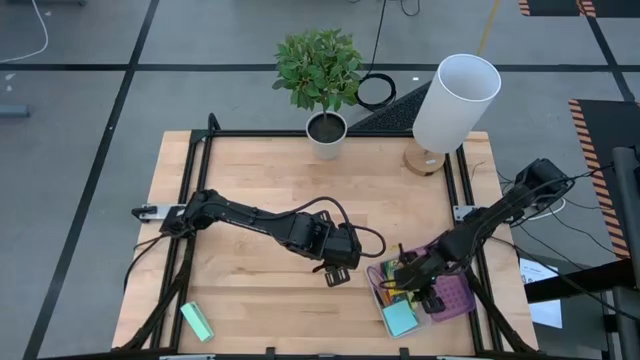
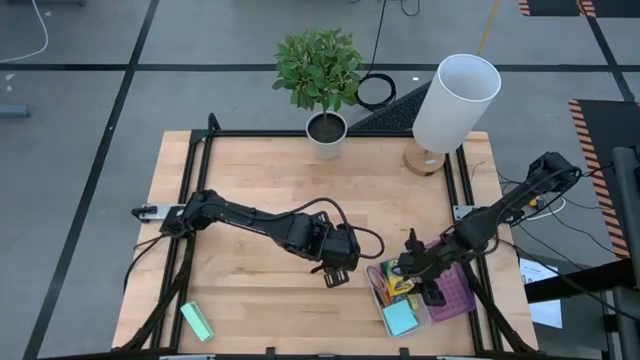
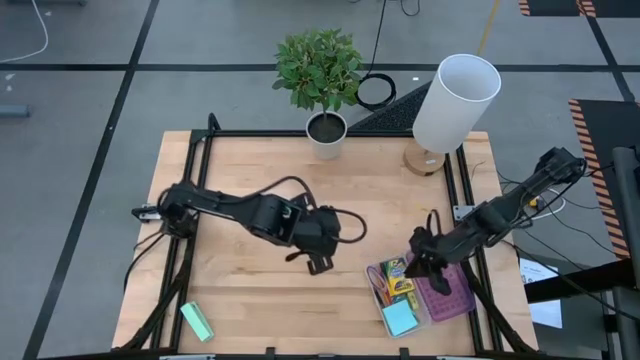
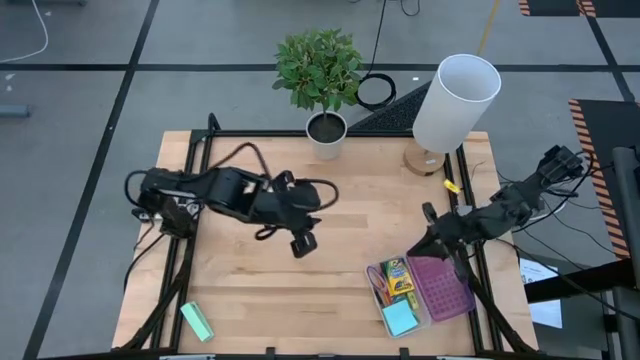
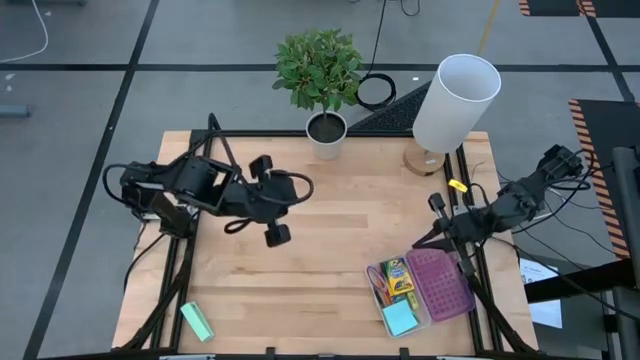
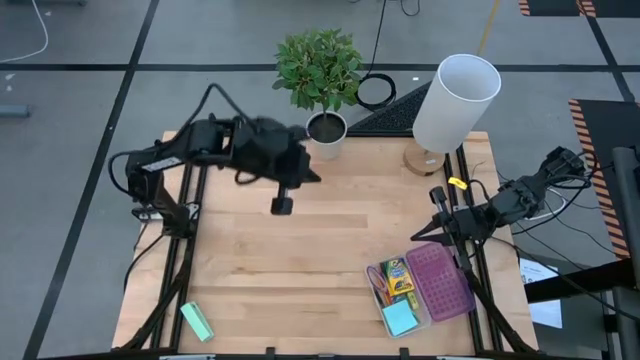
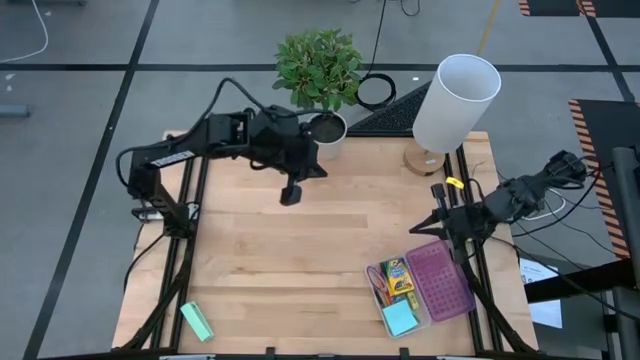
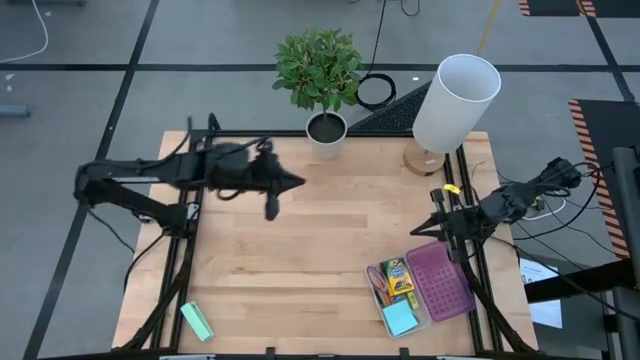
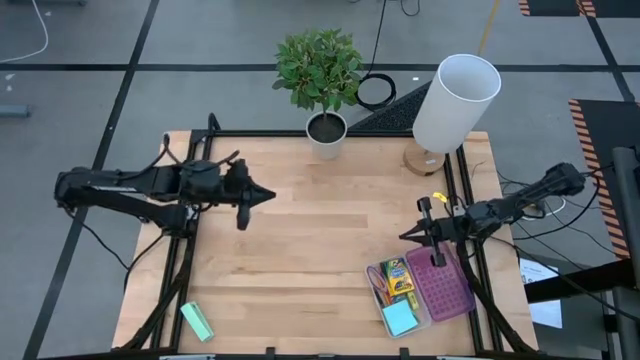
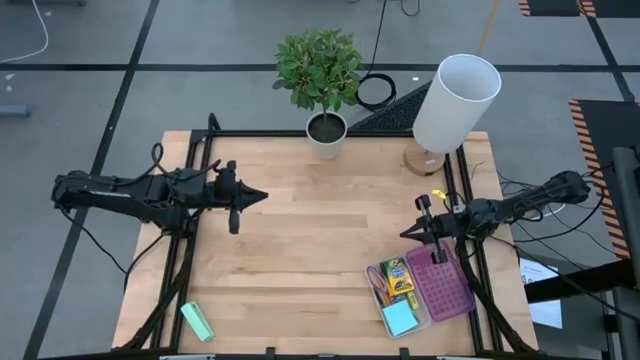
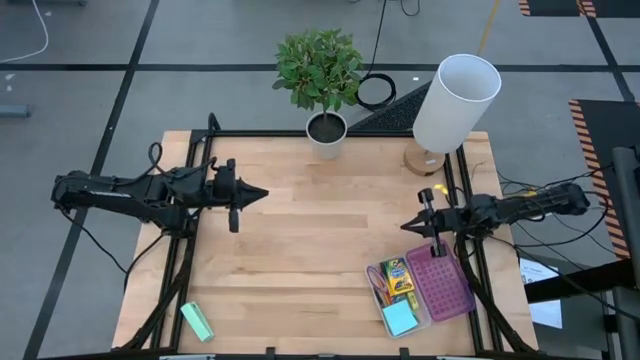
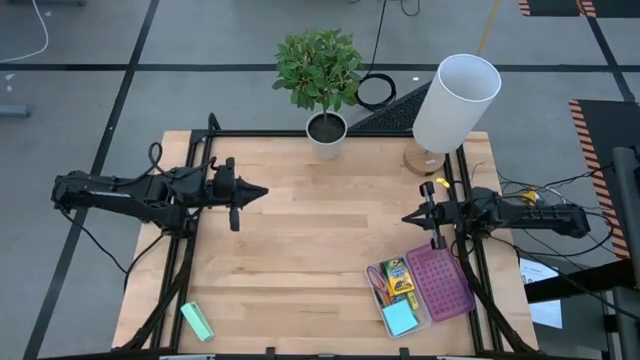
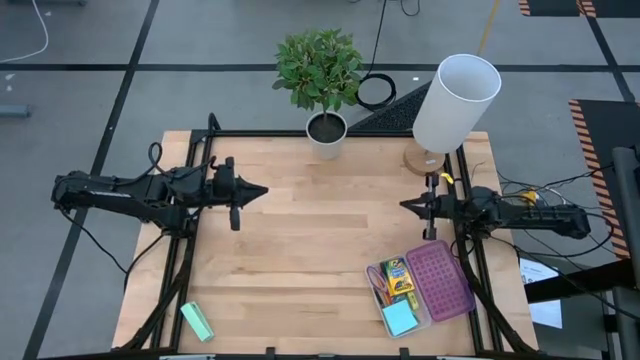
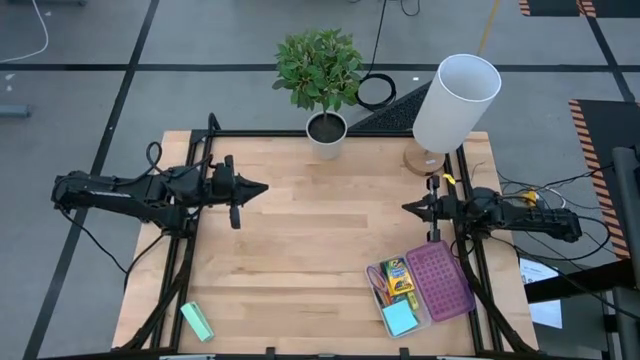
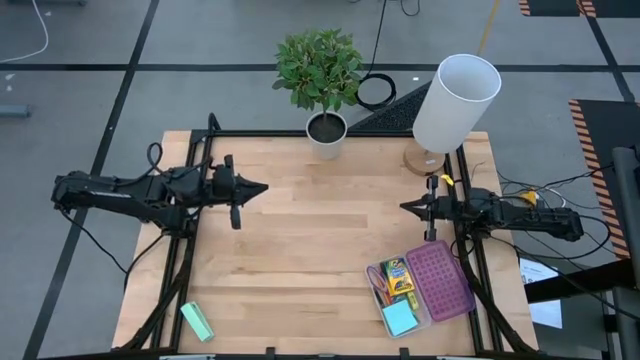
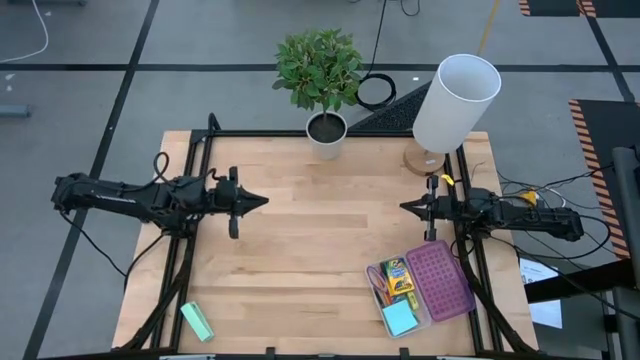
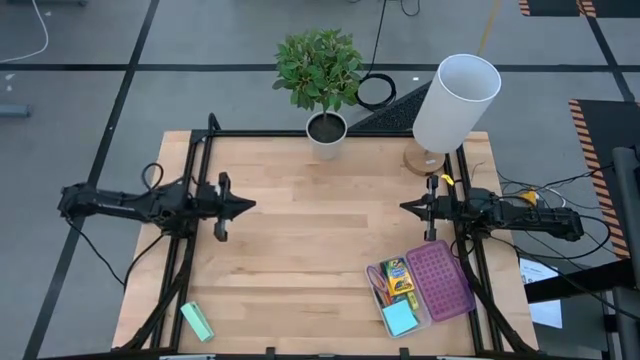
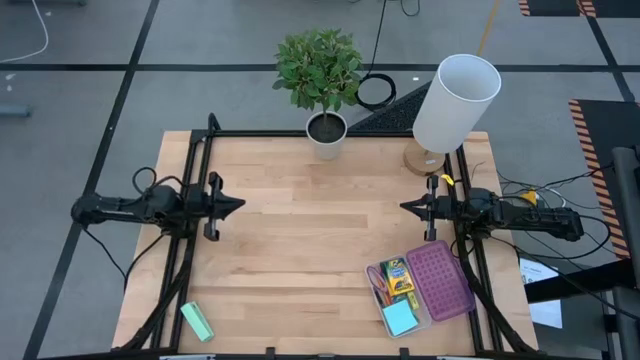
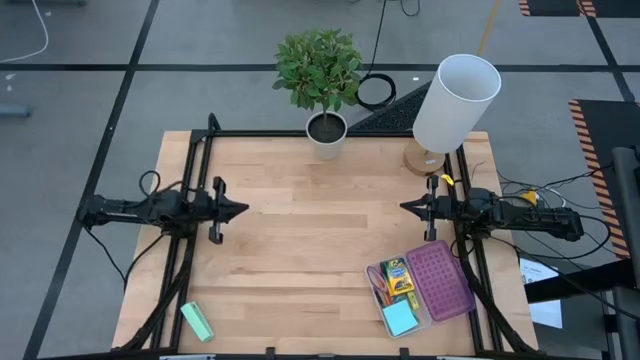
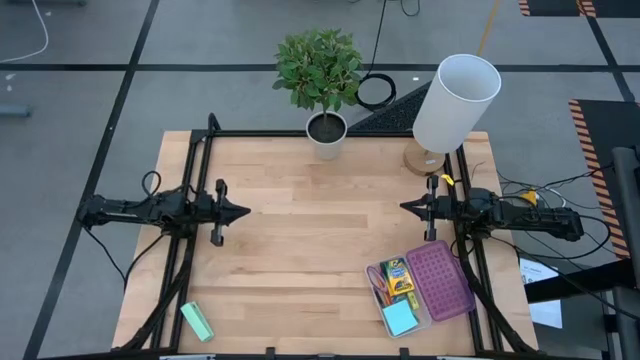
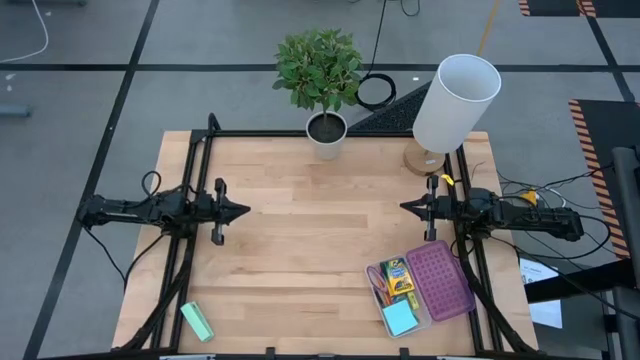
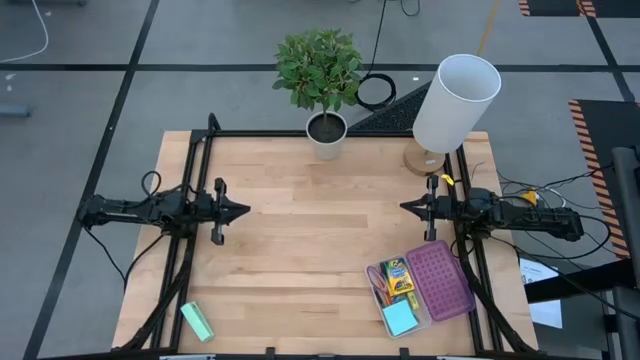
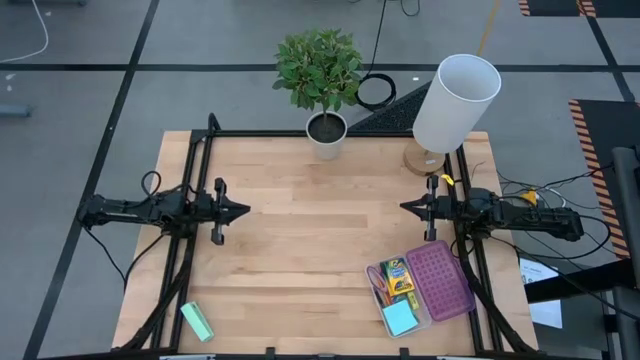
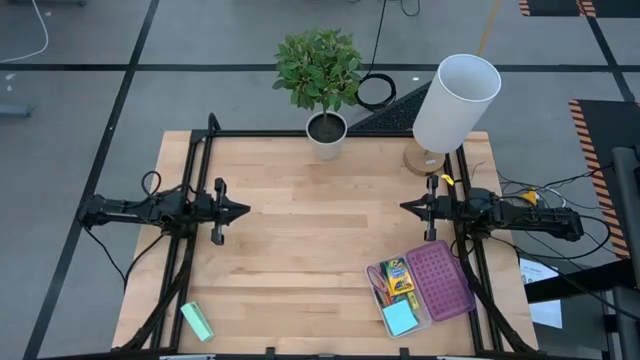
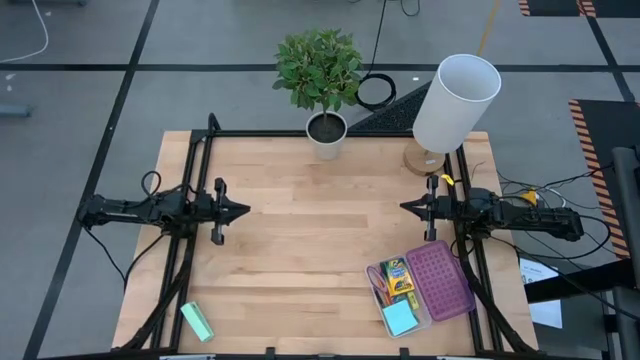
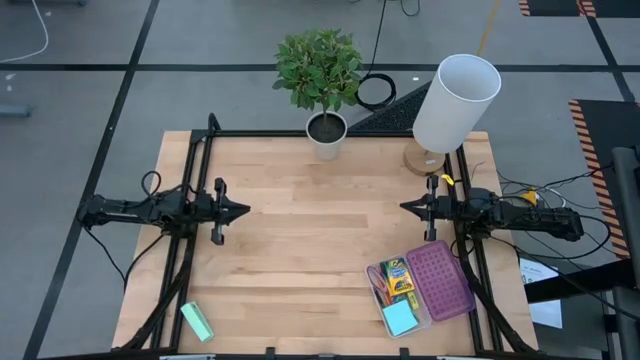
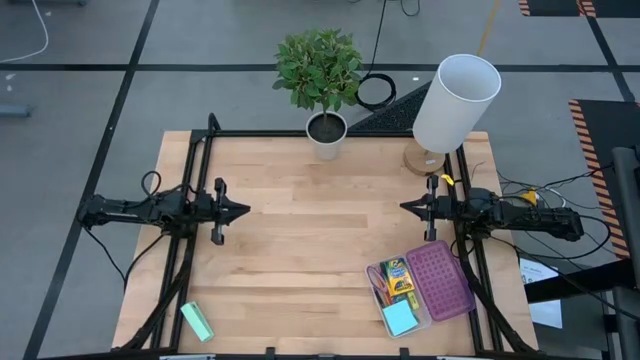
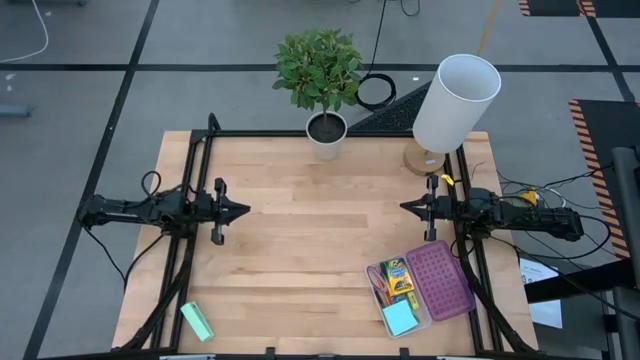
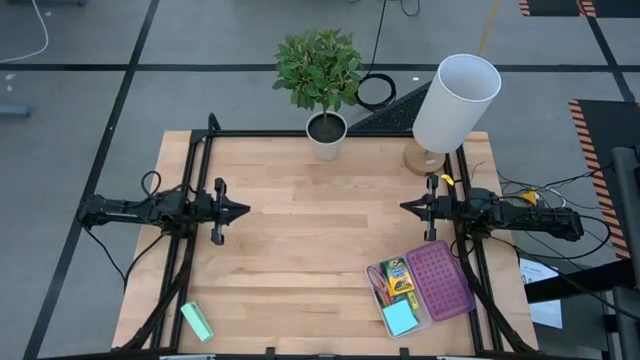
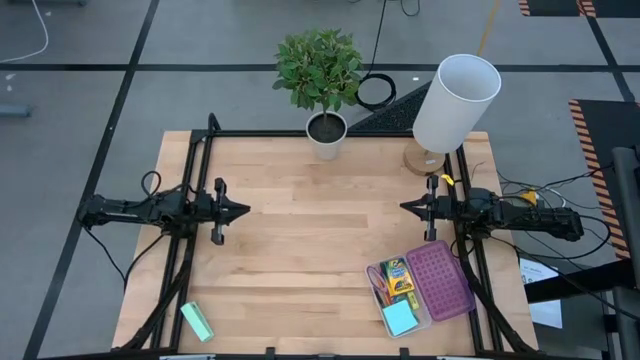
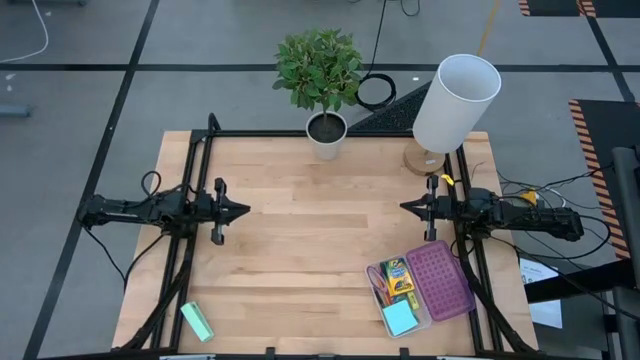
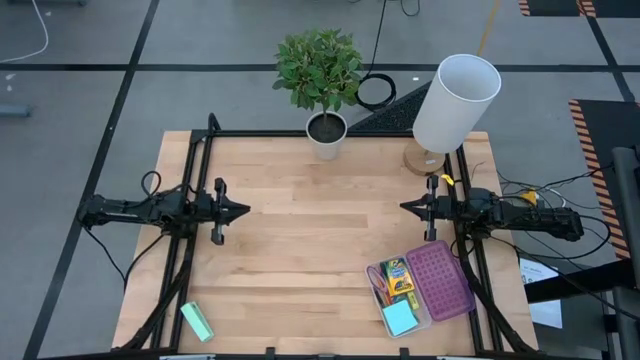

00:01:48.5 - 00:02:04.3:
Task: Pack school essentials
Return to Home Position
